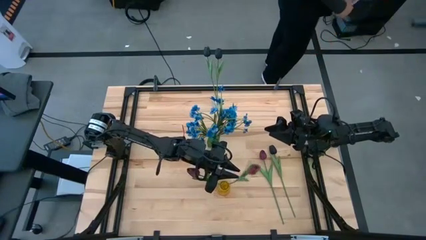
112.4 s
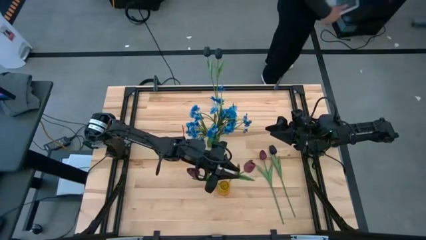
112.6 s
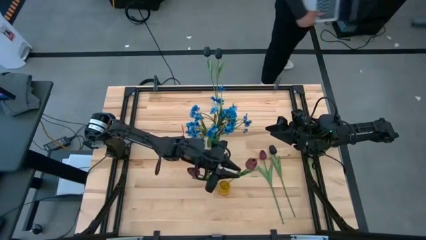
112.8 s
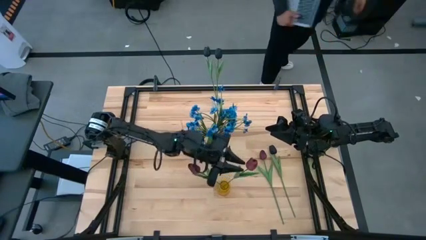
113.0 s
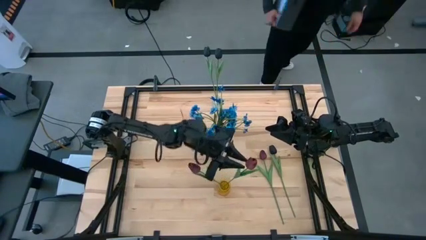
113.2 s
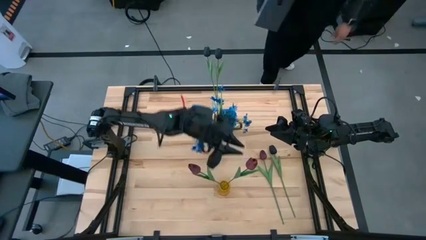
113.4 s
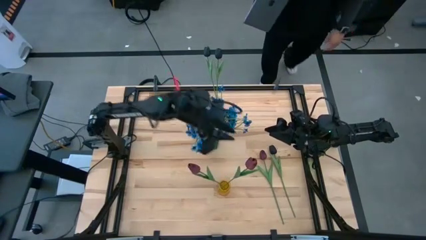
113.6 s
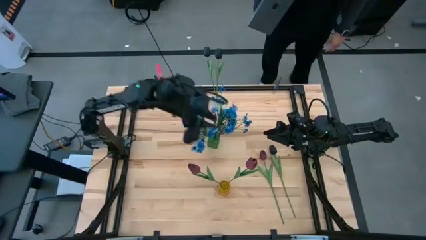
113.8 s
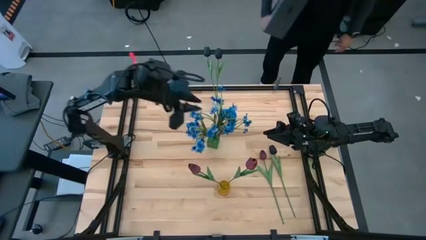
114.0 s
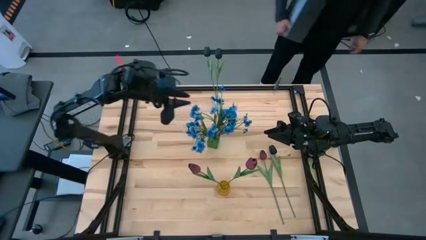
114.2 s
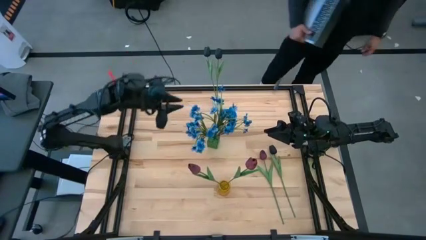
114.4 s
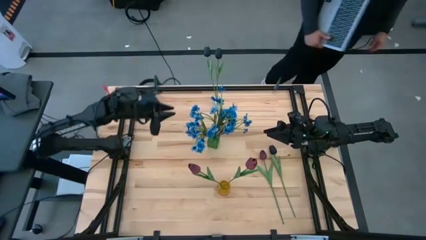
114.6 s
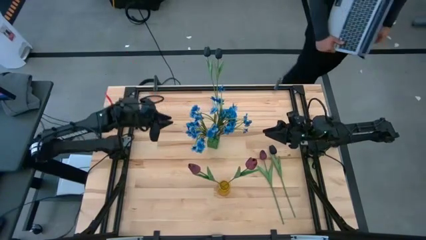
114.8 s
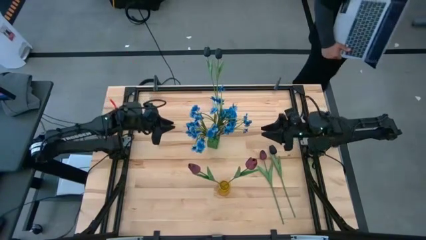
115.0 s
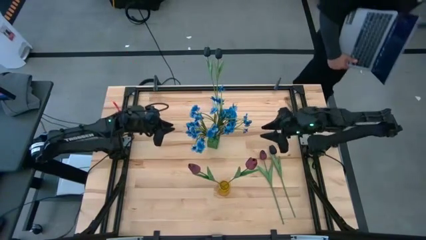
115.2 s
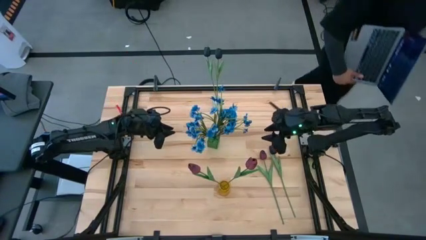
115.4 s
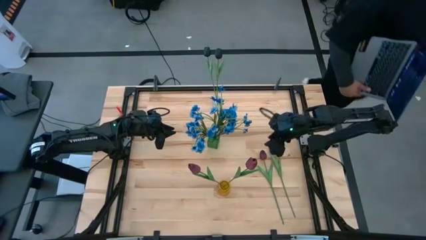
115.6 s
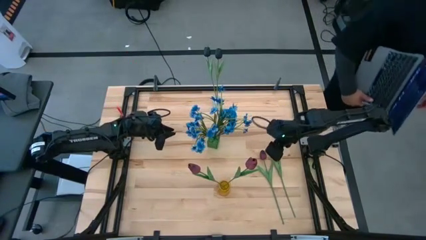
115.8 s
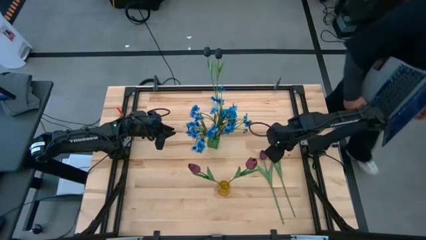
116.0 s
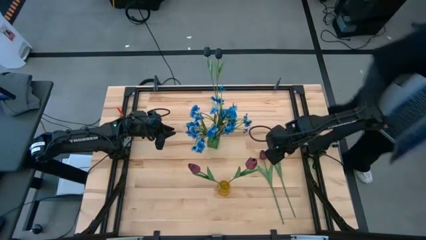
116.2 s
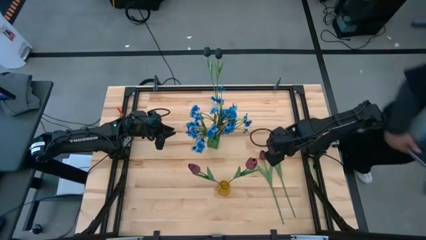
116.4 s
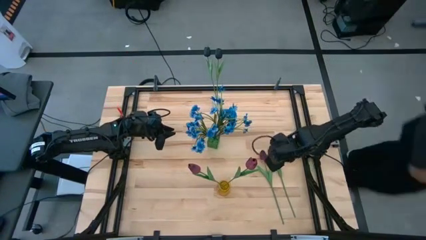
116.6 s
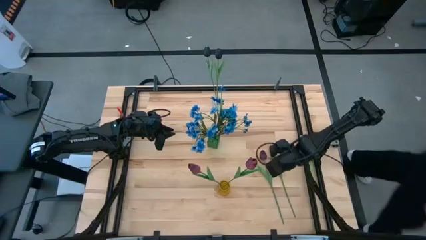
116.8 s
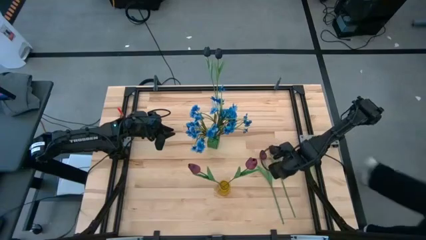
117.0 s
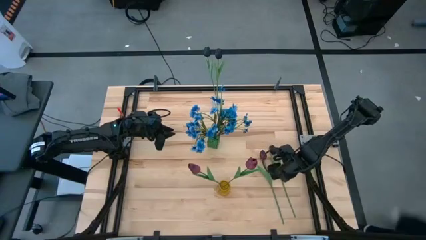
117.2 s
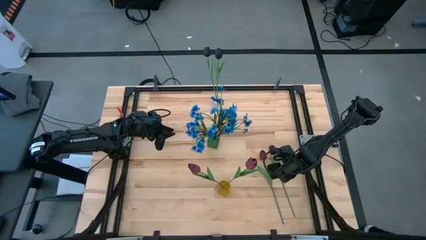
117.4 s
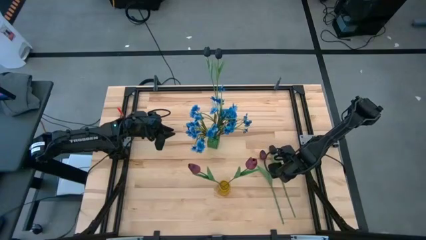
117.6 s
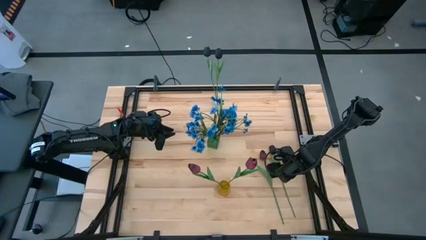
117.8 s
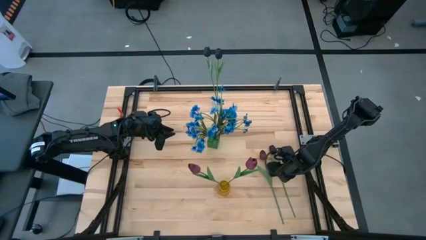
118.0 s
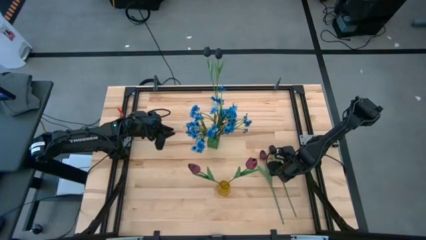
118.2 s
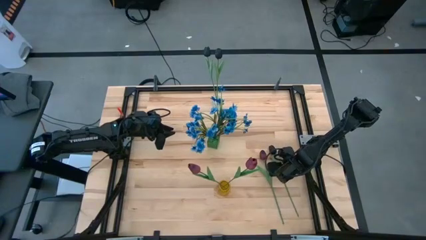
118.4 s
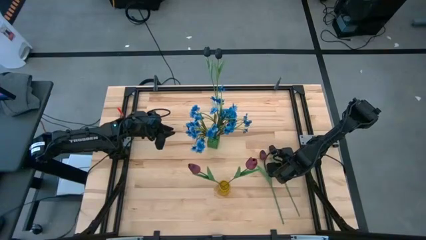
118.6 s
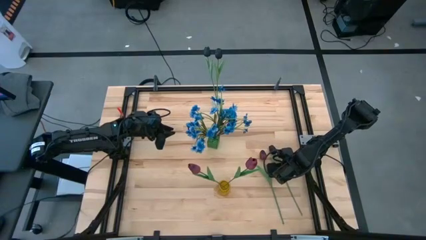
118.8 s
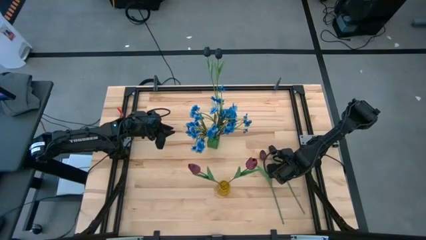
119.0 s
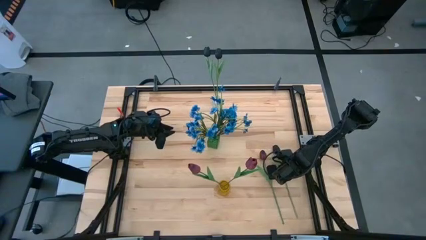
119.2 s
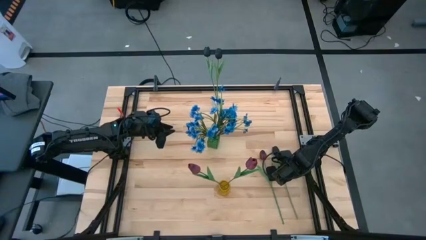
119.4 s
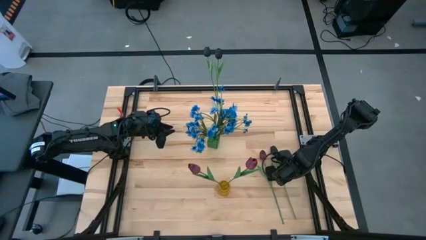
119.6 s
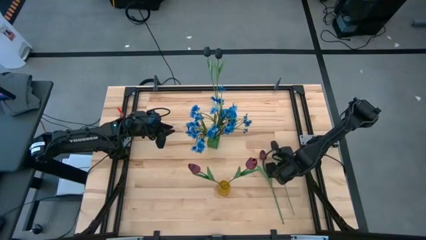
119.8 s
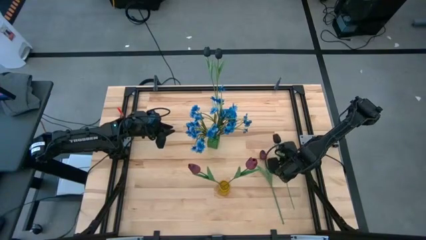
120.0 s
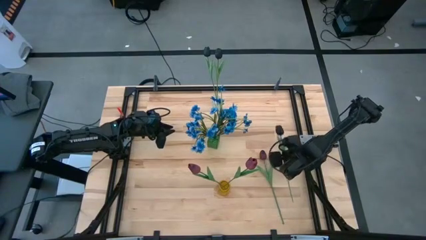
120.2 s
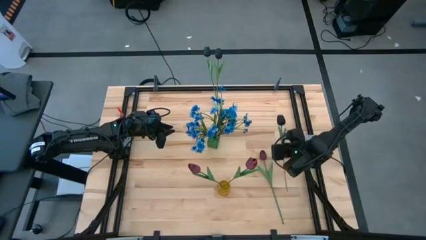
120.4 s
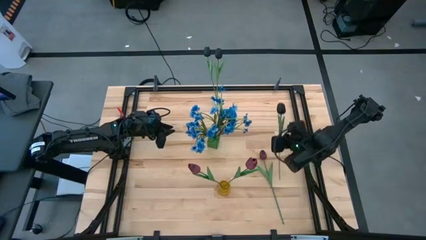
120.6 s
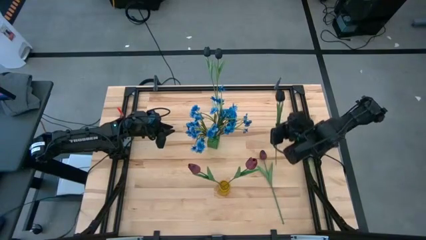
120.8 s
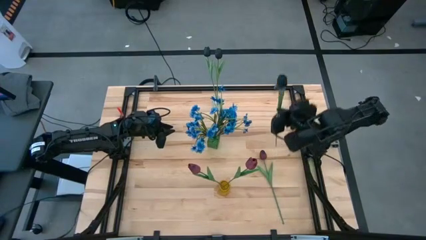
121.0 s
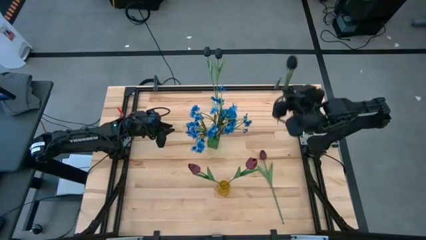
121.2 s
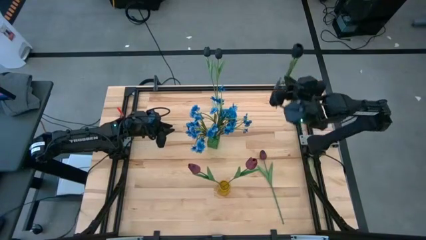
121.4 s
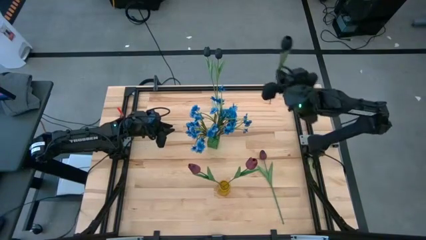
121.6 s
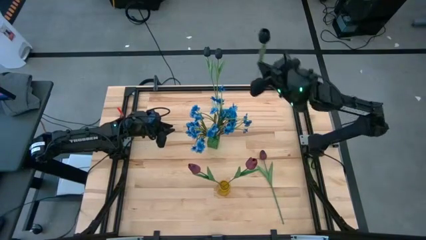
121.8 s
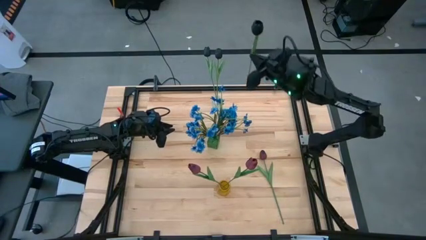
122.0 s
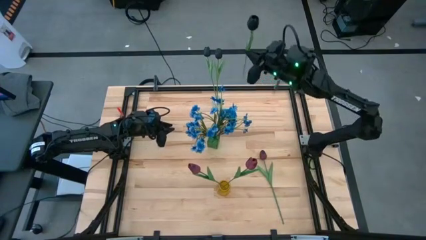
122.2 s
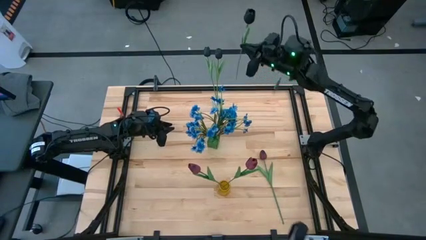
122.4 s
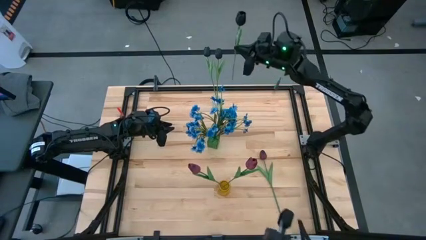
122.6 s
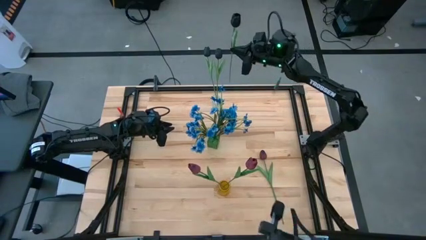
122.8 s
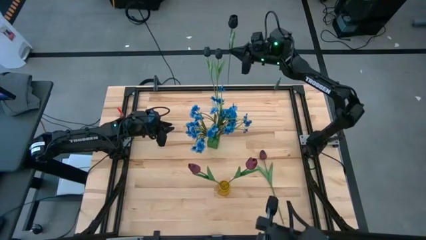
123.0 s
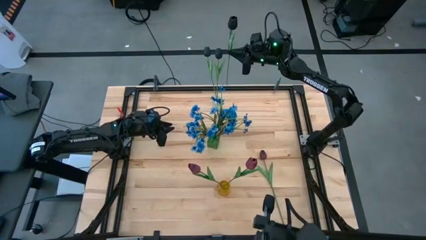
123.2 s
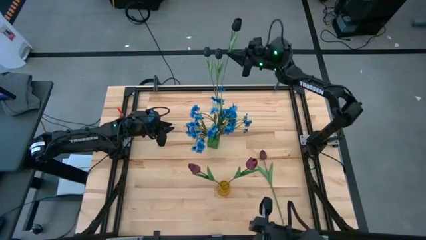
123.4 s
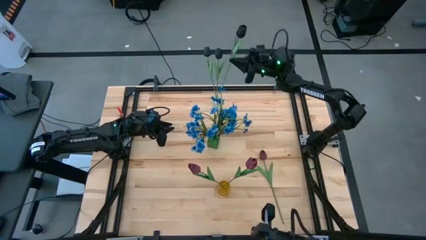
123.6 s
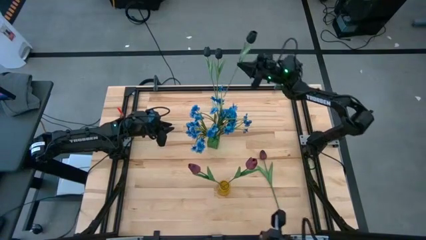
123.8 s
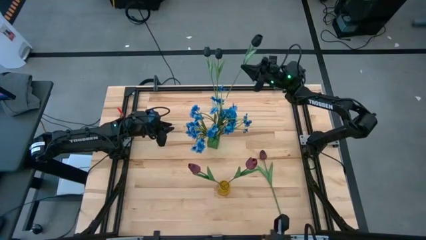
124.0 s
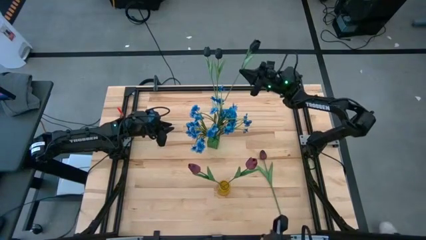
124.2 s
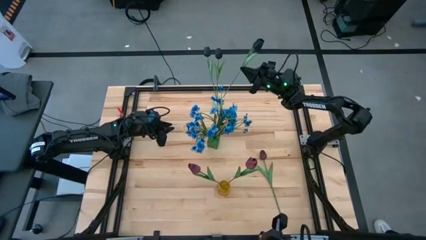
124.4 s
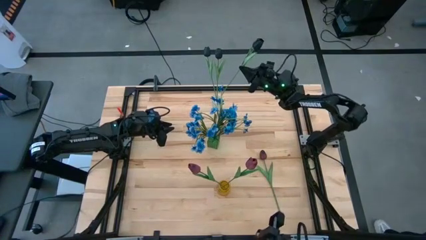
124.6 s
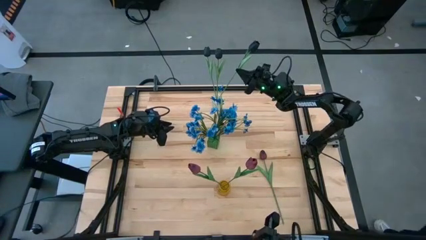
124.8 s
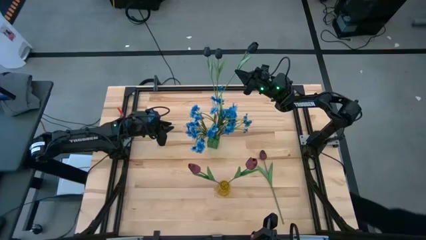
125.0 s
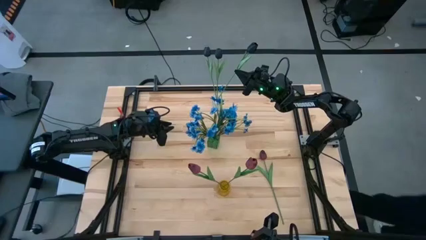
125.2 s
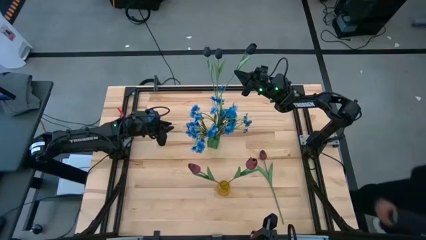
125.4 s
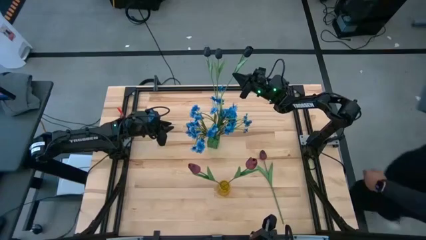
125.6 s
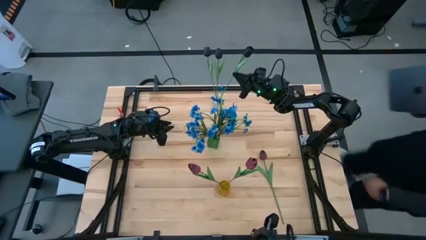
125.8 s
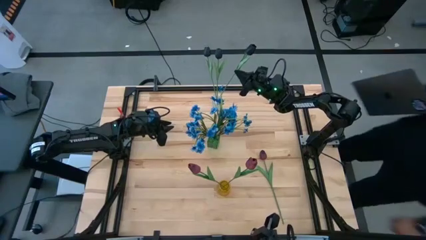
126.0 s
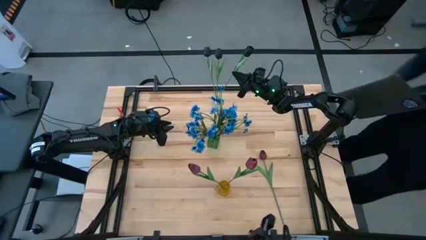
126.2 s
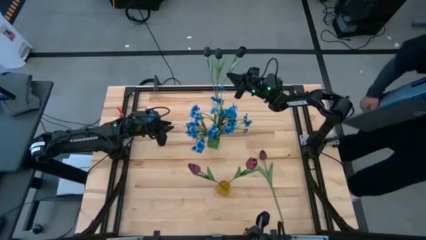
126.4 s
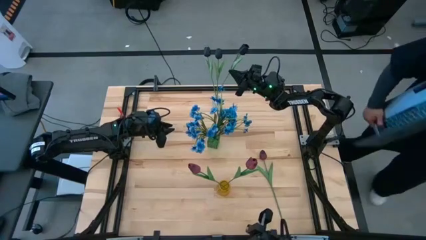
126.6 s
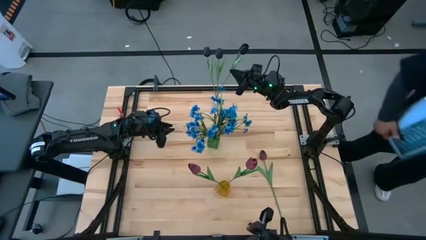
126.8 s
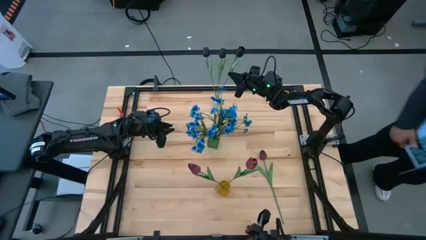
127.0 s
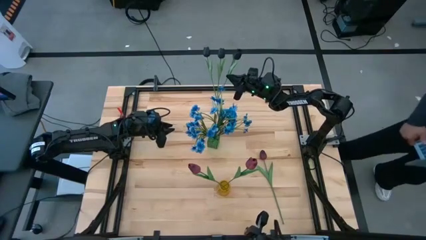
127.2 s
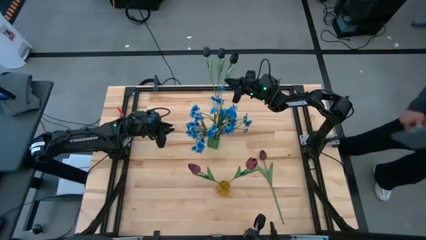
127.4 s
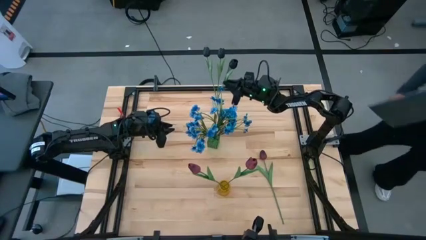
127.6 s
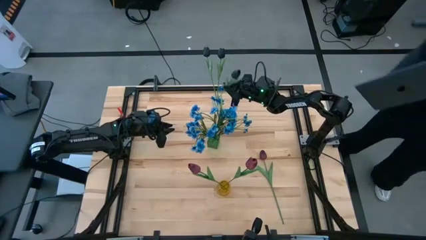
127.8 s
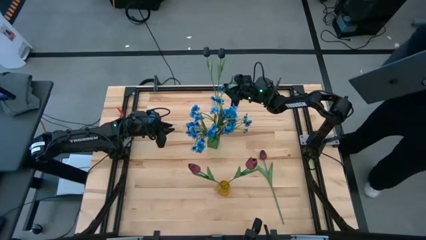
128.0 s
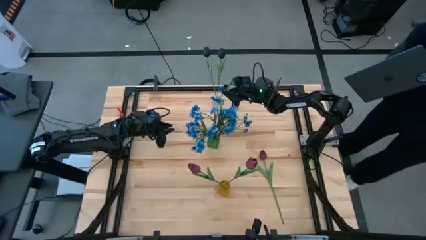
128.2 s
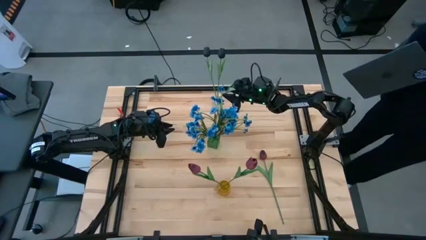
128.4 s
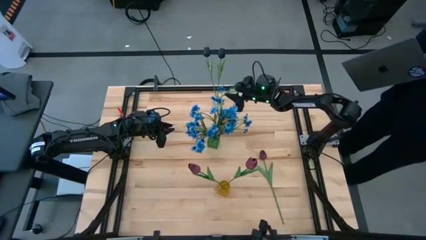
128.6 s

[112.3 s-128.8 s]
Task: Sort flowers into vase by color
Put the black tulip into the transparent vase
